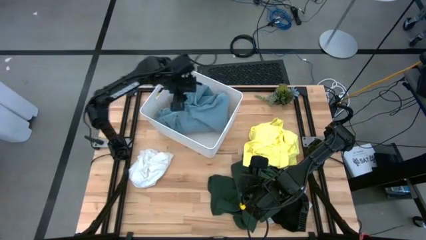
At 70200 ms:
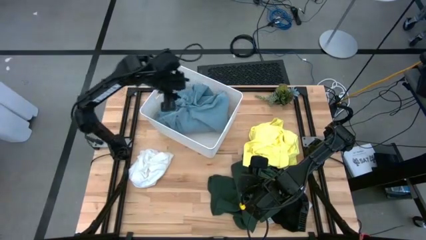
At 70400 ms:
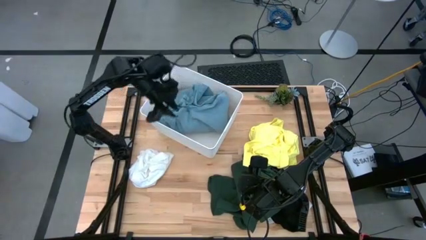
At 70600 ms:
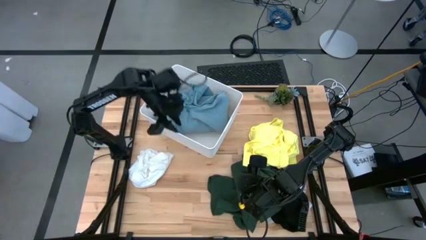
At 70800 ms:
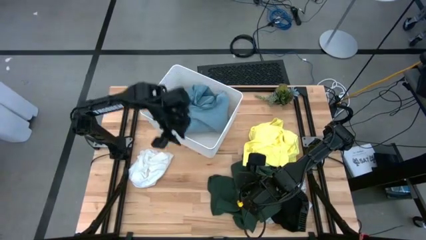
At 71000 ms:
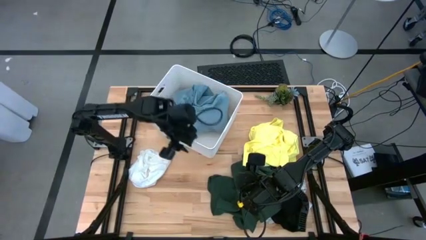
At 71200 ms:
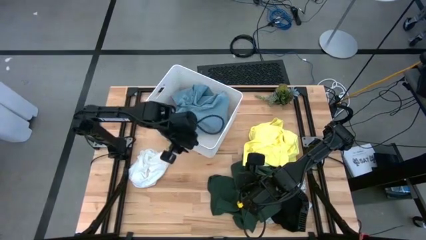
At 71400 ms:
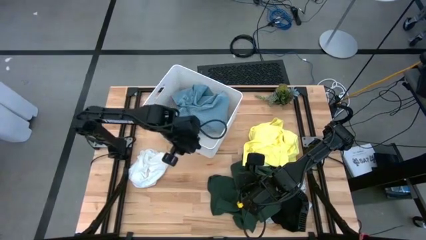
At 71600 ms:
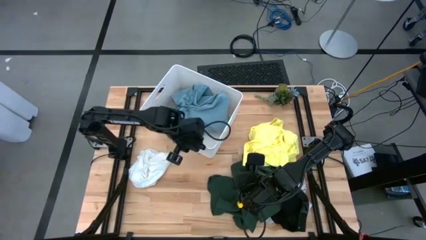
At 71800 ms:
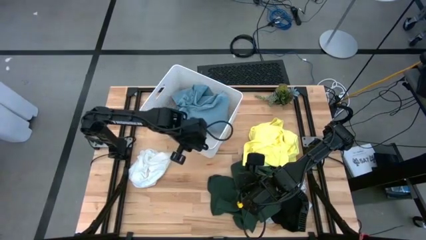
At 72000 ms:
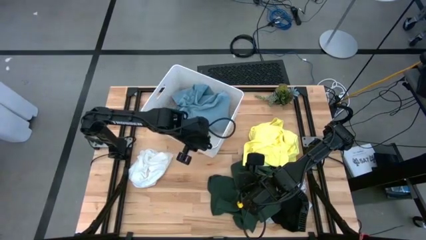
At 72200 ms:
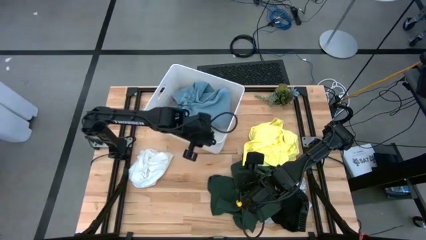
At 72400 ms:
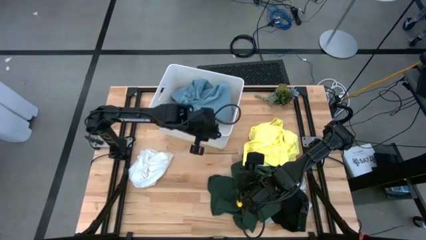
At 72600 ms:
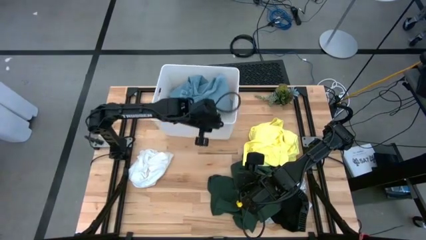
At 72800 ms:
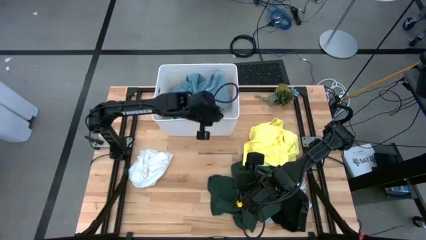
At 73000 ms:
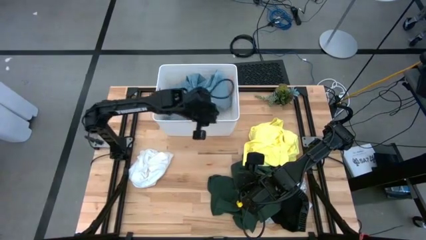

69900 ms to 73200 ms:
Task: Fold laundry
Adjust the white laundry bin

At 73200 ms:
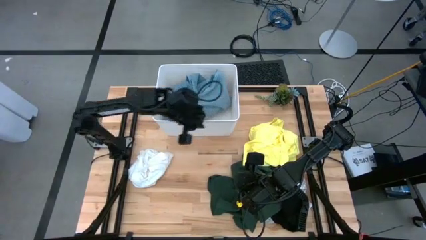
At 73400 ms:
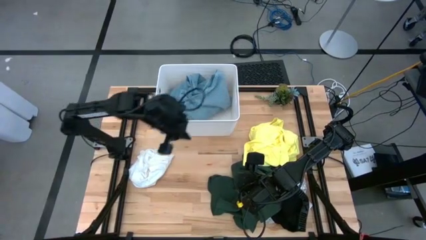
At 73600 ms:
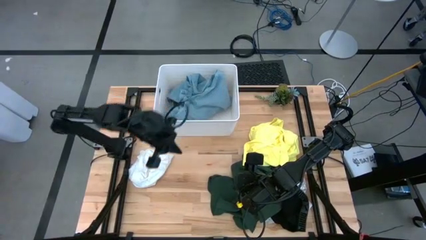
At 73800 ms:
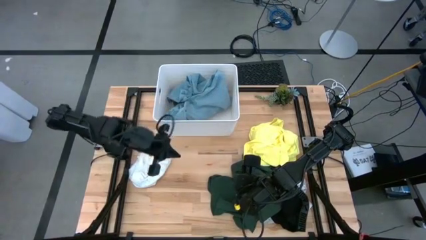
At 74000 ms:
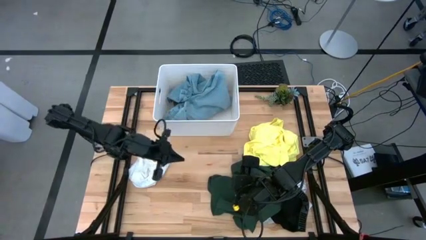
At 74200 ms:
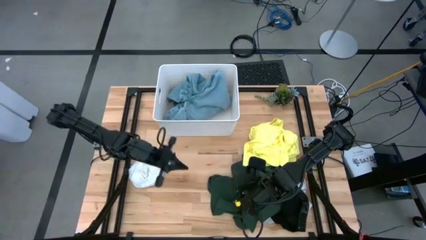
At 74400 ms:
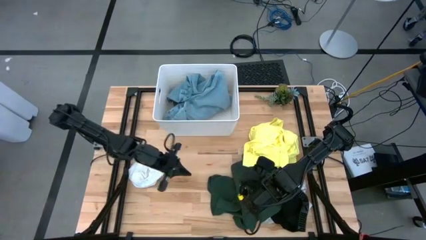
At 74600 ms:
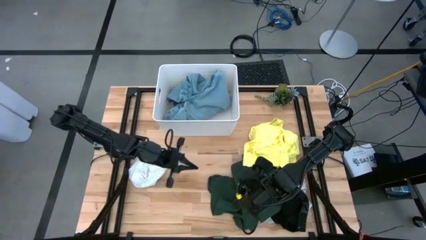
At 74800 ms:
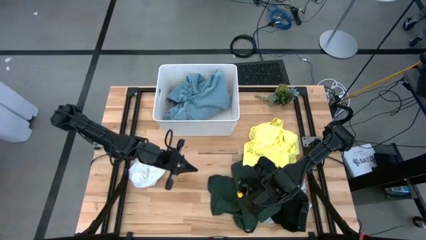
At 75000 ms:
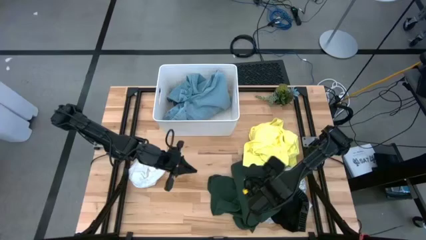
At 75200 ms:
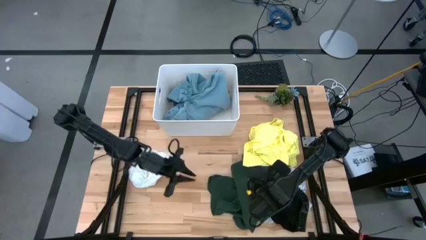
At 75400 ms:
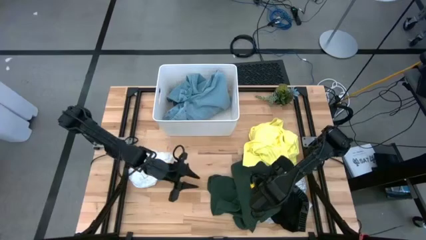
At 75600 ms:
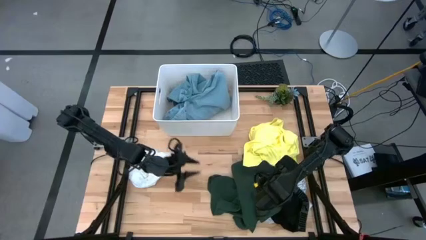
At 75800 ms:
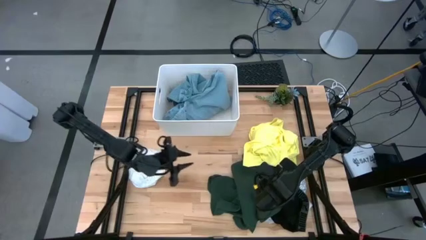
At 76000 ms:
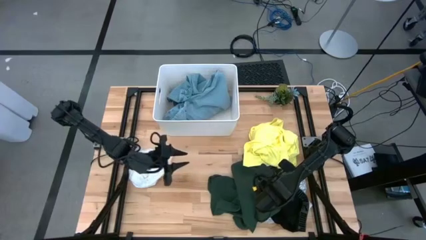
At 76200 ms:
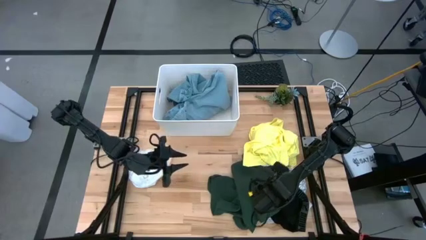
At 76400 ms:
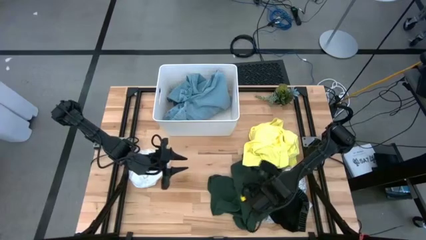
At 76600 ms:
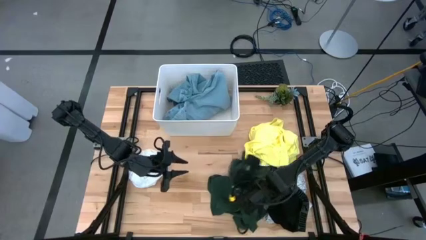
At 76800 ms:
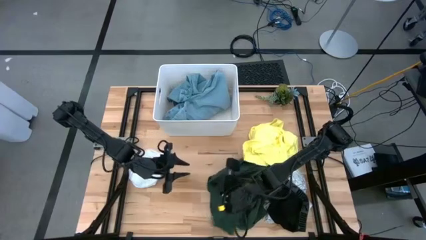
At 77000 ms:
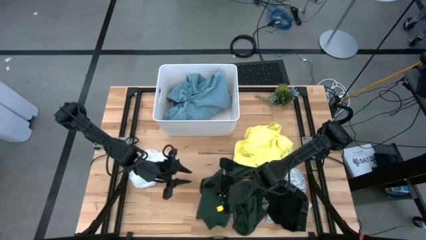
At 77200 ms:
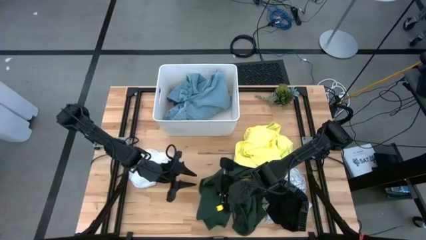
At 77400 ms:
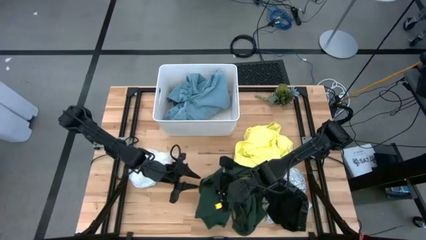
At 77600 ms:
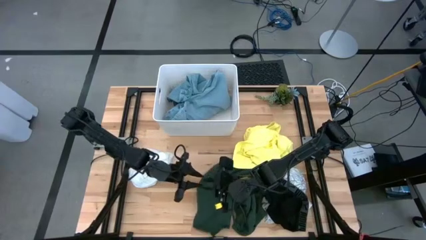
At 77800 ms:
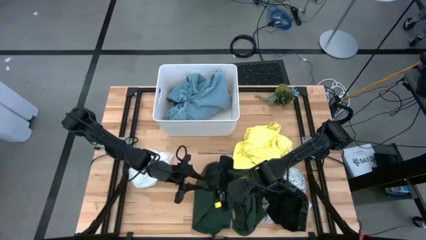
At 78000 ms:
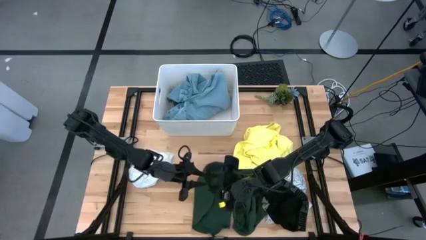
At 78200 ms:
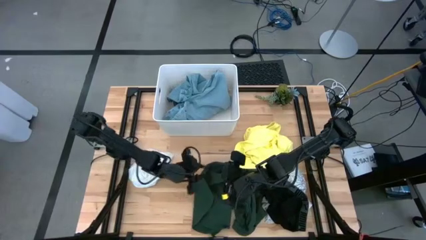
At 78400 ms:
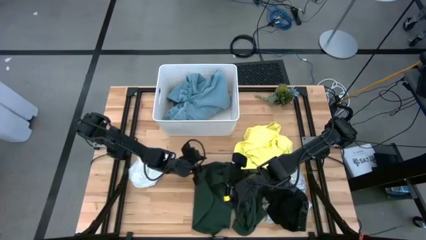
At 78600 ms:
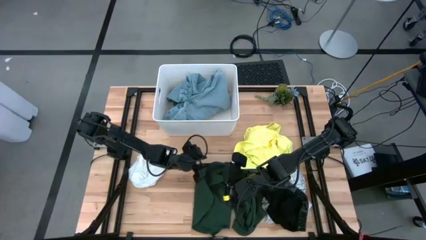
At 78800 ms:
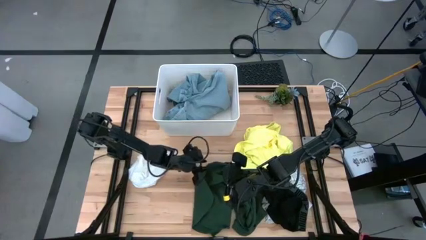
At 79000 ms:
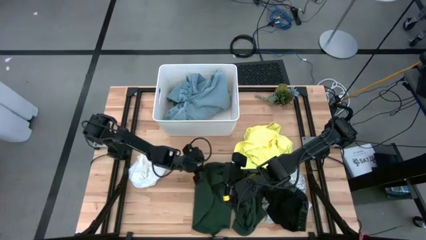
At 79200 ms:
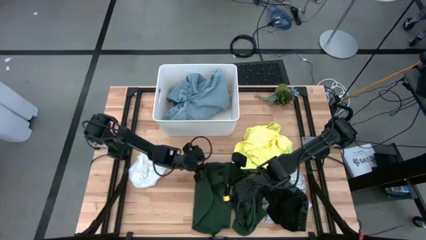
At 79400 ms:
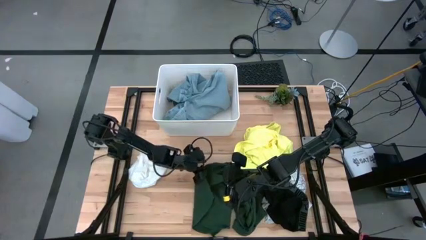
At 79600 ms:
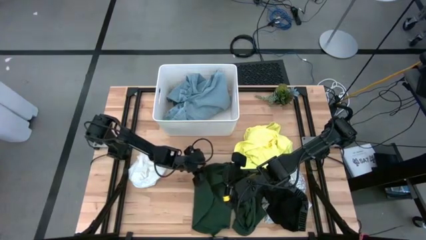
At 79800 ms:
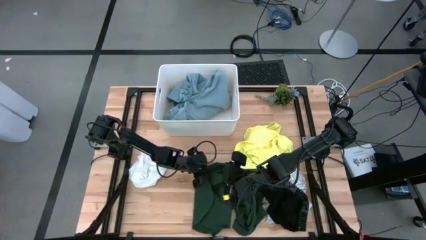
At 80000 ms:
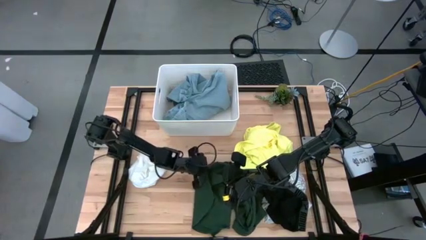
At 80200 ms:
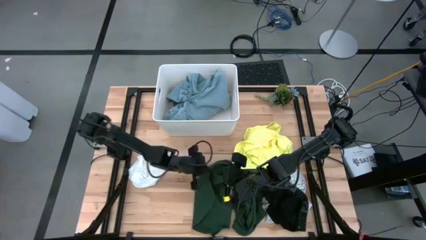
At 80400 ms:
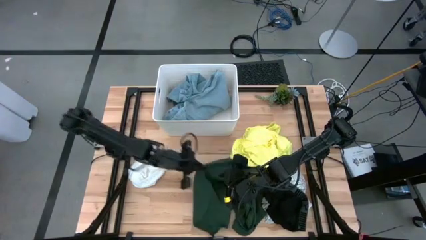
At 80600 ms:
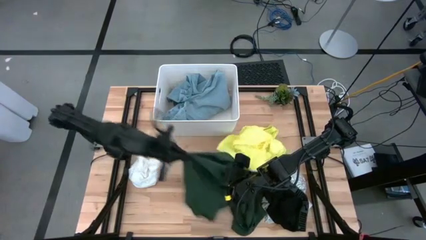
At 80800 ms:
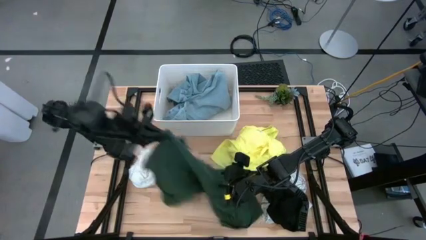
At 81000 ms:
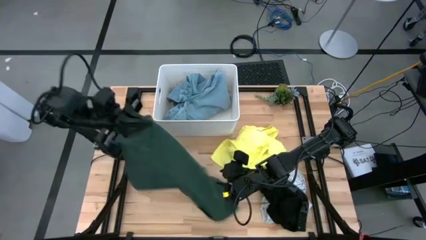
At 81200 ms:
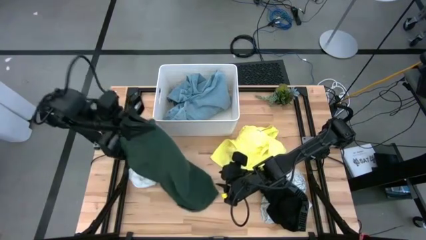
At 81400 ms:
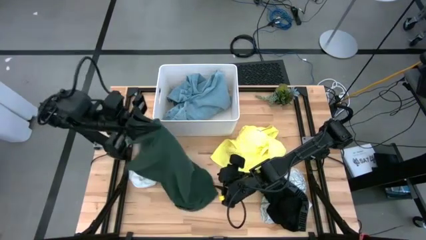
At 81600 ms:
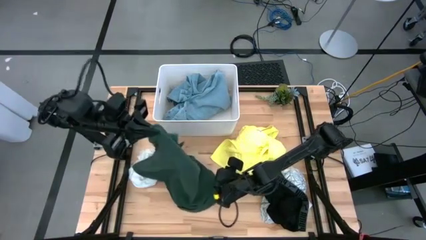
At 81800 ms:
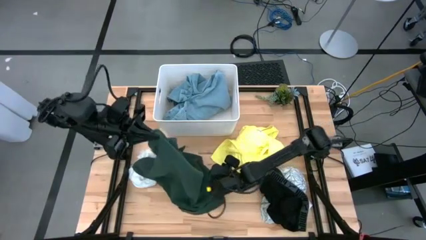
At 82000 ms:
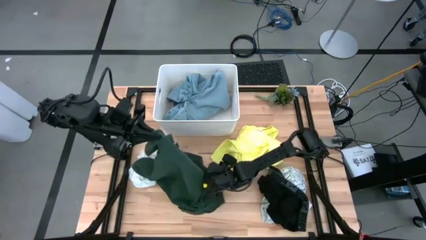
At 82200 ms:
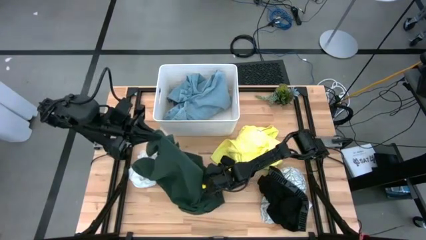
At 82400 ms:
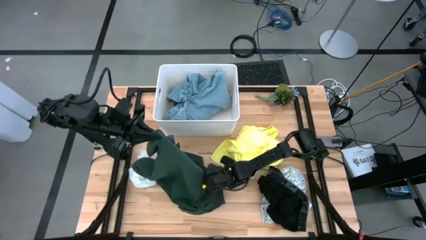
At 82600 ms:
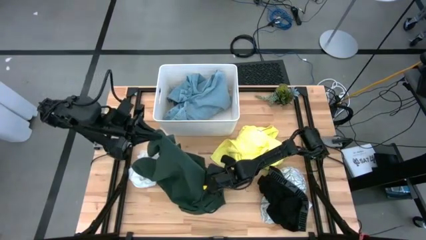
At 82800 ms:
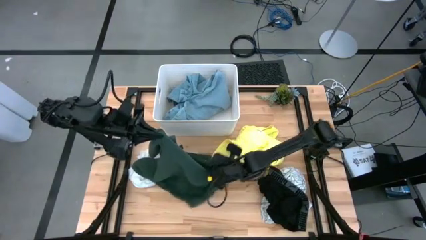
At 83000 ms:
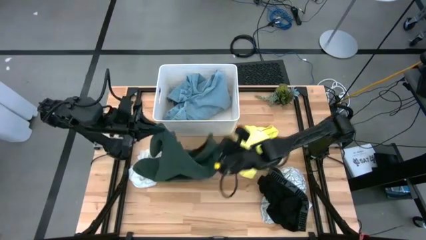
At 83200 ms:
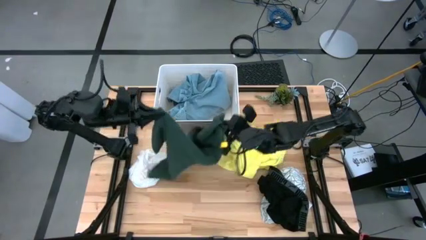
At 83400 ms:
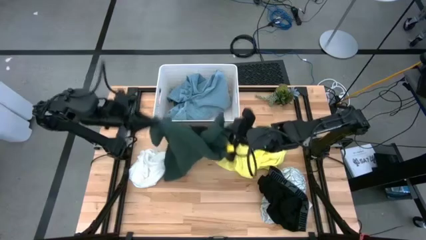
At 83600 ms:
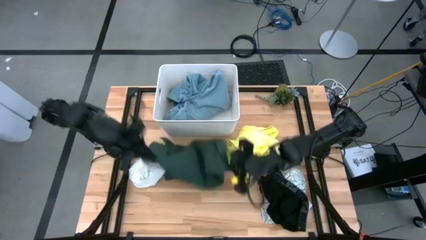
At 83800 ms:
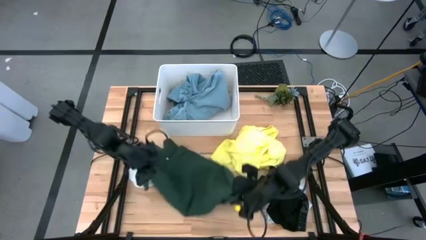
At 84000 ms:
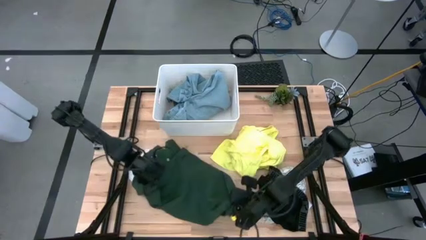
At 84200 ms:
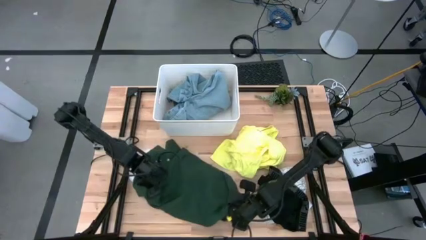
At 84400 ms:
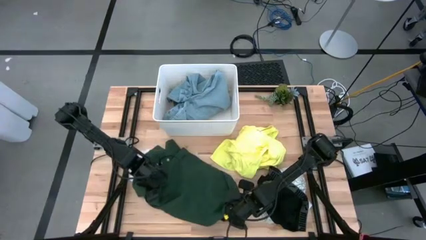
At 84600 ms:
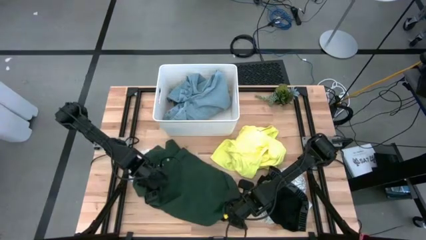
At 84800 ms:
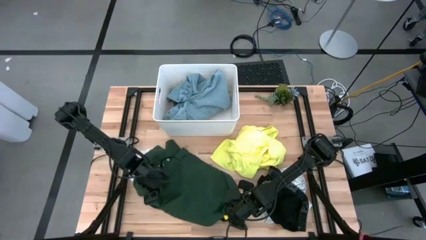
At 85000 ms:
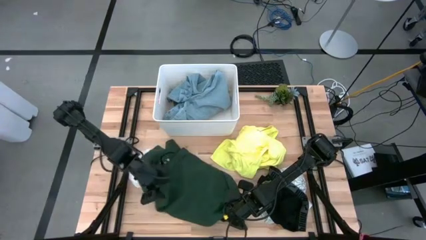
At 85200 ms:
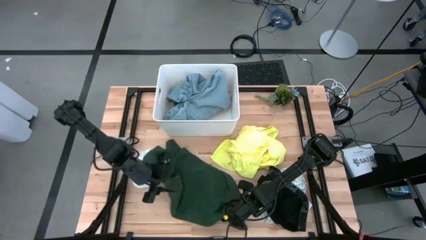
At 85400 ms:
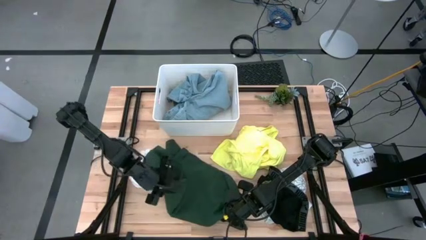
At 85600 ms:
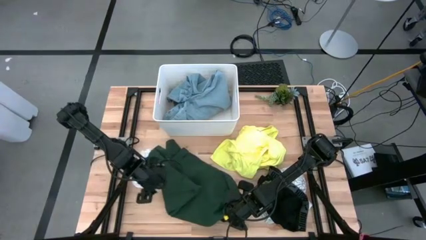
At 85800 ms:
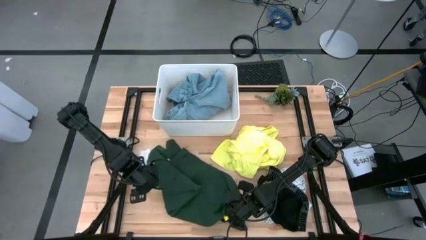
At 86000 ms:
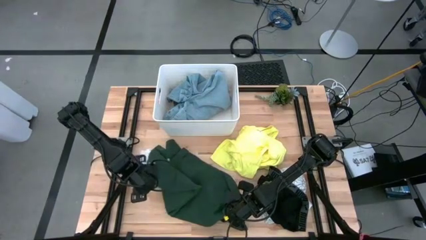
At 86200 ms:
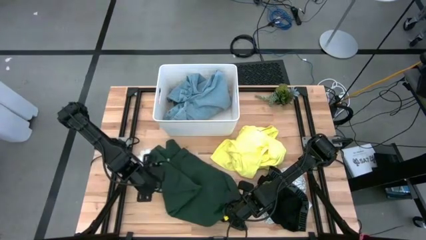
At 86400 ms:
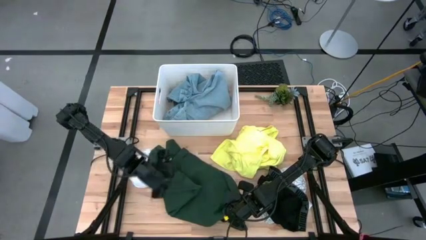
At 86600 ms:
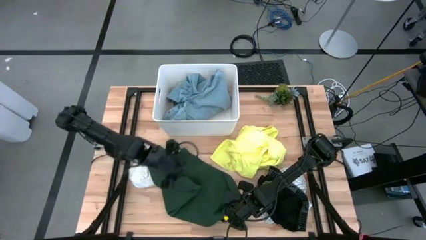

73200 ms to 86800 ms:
Fold the green shirt
